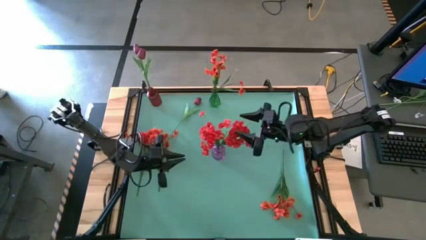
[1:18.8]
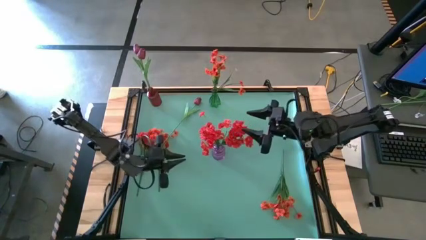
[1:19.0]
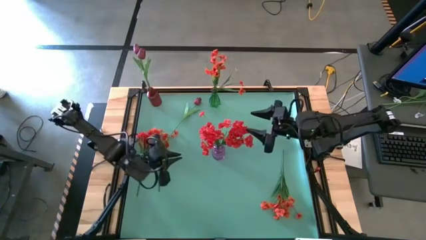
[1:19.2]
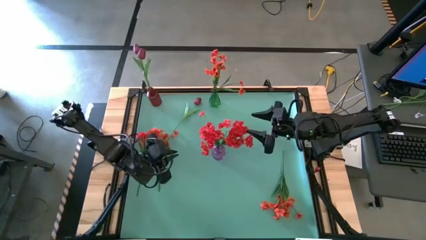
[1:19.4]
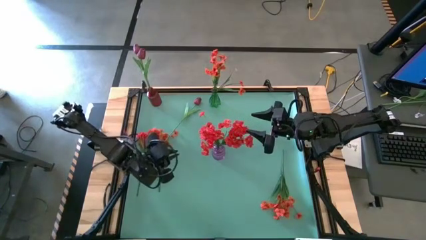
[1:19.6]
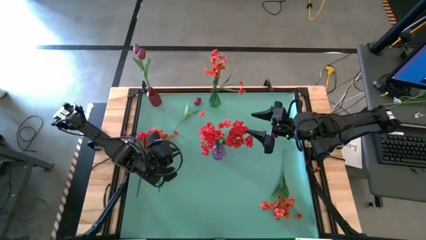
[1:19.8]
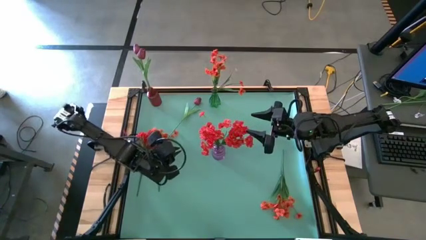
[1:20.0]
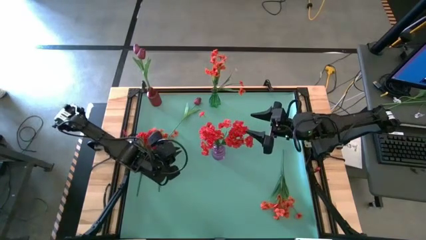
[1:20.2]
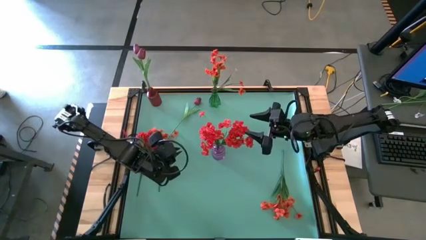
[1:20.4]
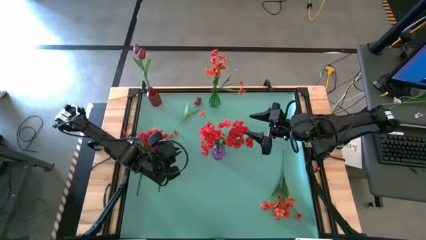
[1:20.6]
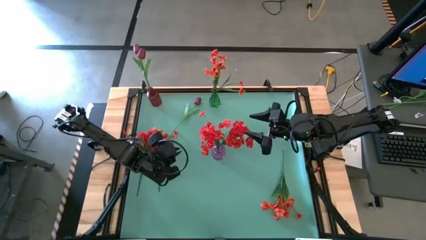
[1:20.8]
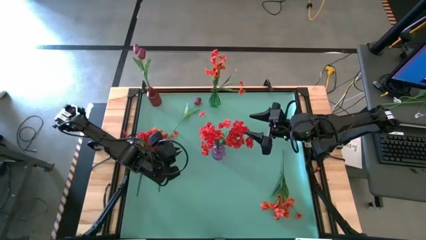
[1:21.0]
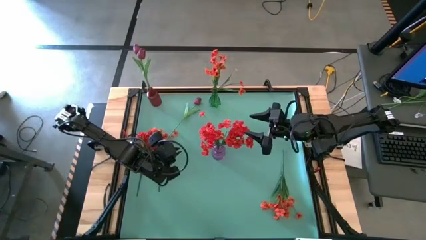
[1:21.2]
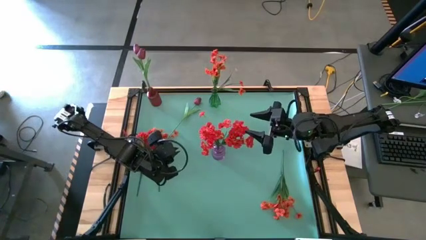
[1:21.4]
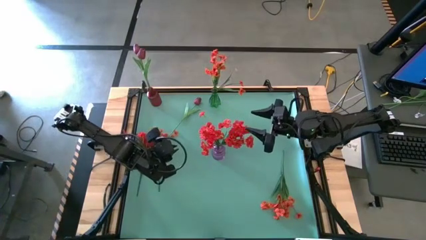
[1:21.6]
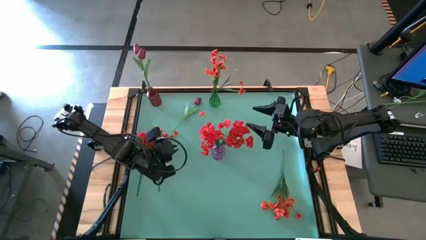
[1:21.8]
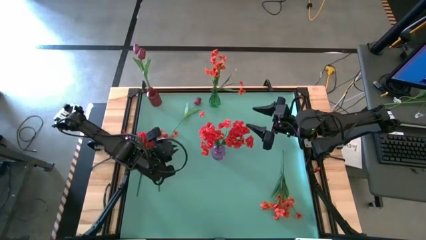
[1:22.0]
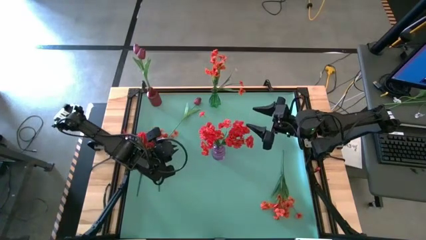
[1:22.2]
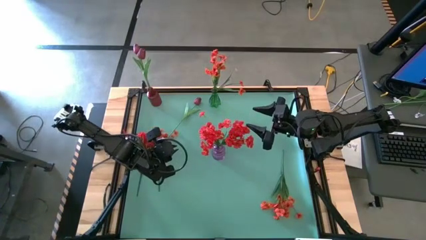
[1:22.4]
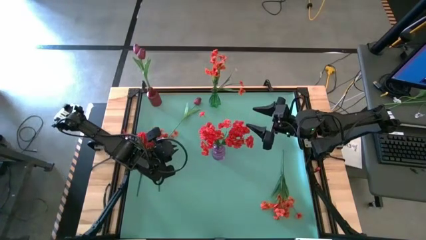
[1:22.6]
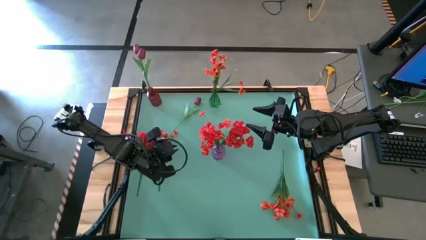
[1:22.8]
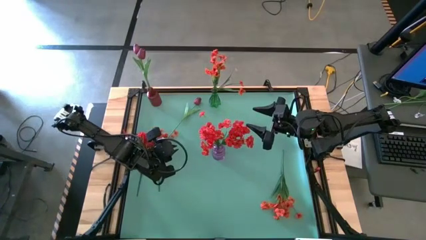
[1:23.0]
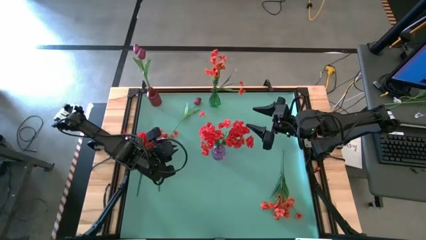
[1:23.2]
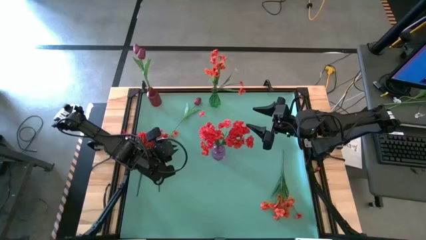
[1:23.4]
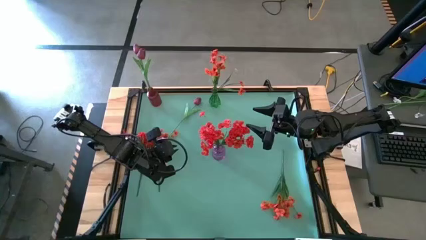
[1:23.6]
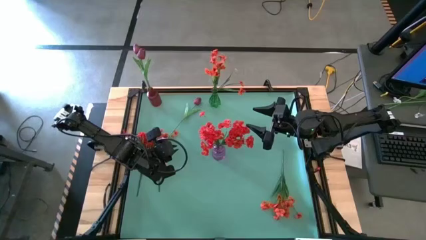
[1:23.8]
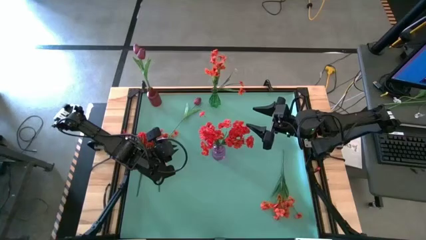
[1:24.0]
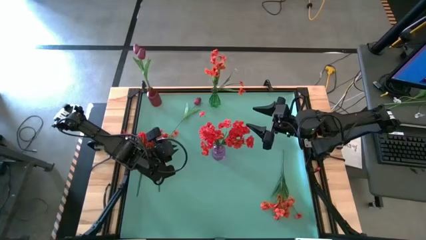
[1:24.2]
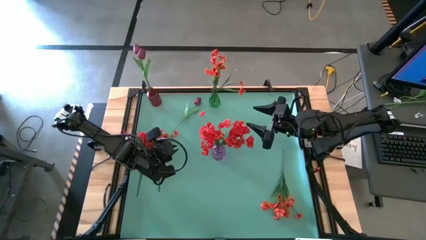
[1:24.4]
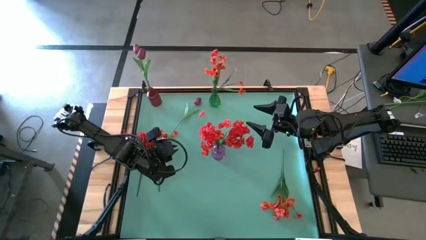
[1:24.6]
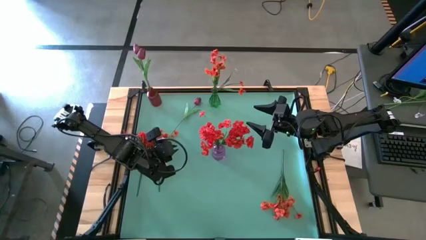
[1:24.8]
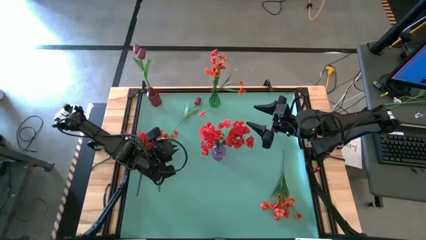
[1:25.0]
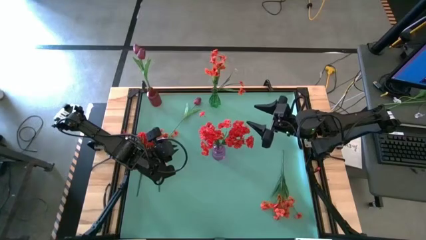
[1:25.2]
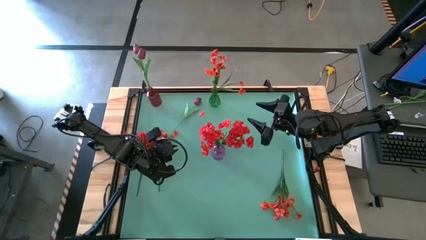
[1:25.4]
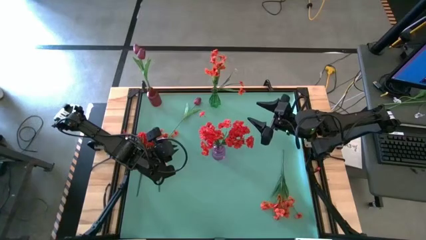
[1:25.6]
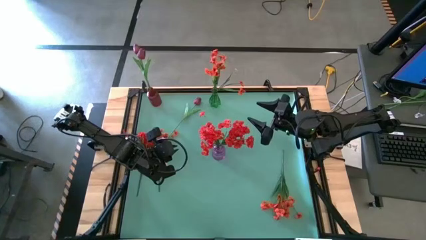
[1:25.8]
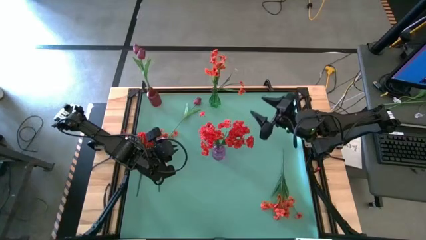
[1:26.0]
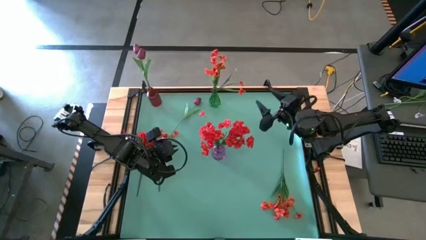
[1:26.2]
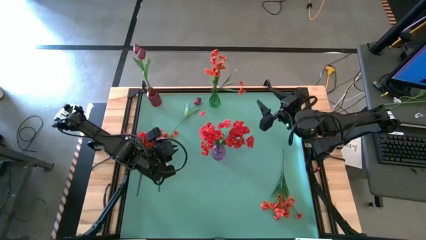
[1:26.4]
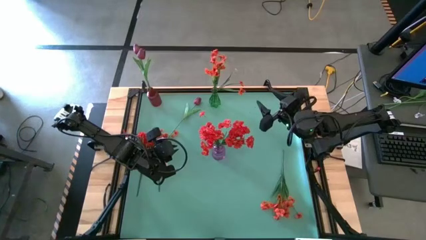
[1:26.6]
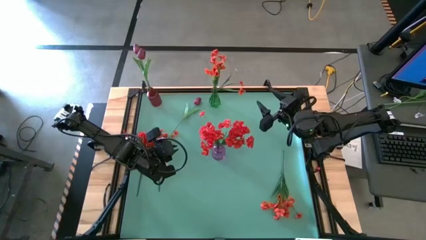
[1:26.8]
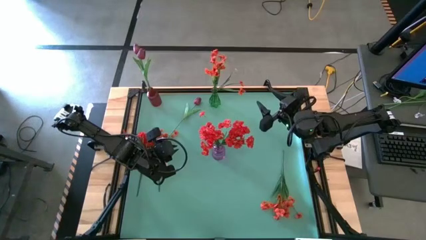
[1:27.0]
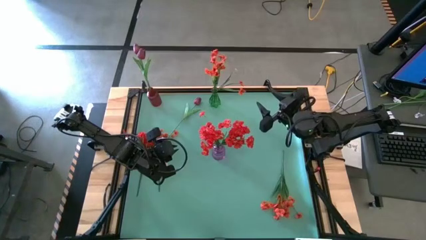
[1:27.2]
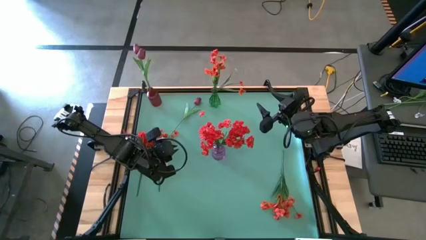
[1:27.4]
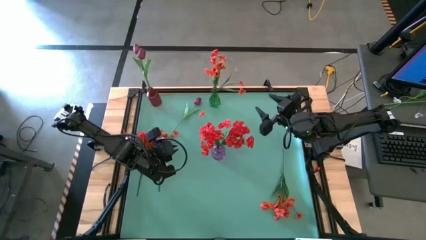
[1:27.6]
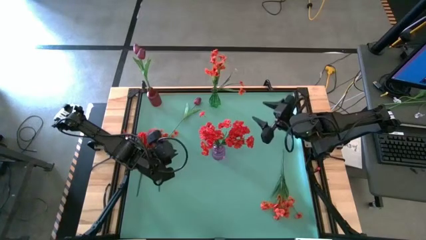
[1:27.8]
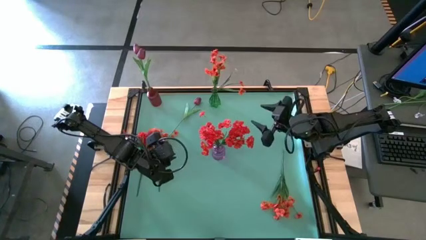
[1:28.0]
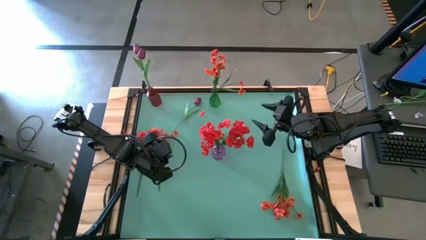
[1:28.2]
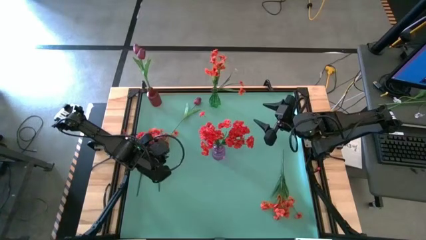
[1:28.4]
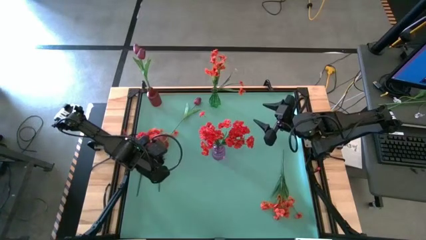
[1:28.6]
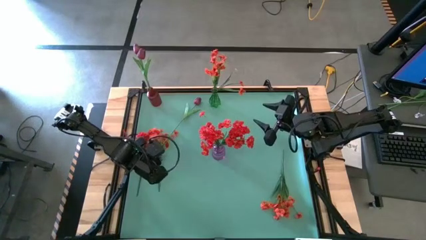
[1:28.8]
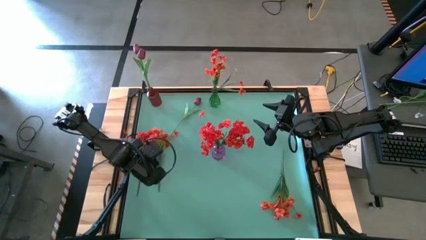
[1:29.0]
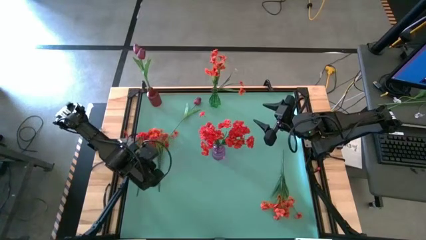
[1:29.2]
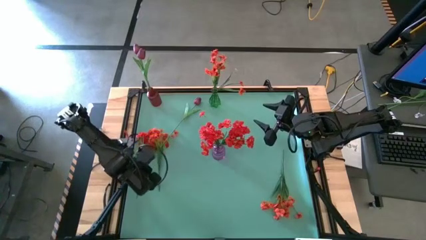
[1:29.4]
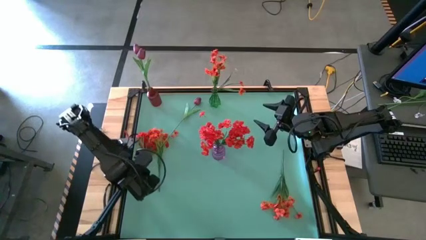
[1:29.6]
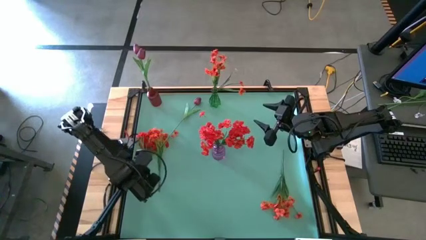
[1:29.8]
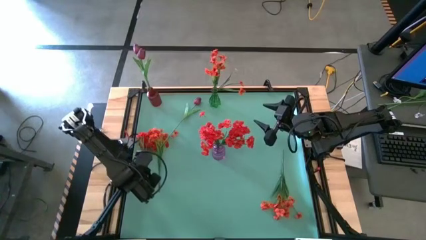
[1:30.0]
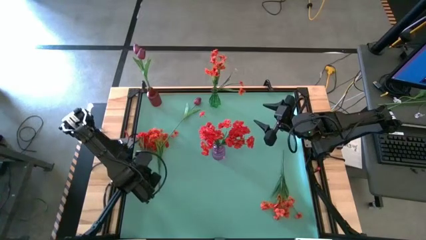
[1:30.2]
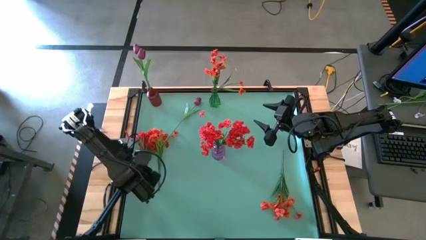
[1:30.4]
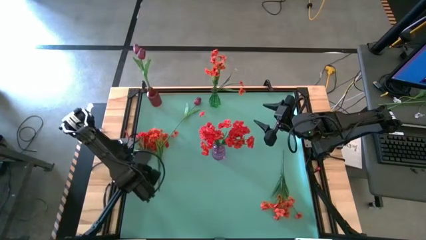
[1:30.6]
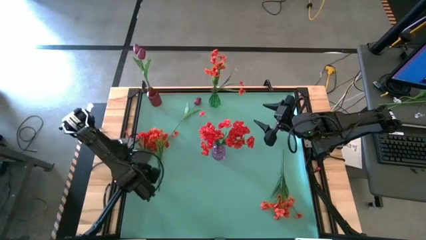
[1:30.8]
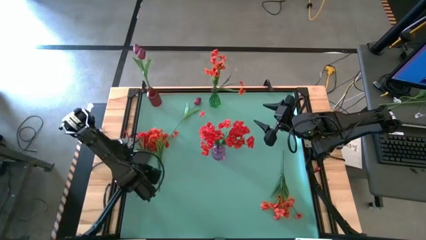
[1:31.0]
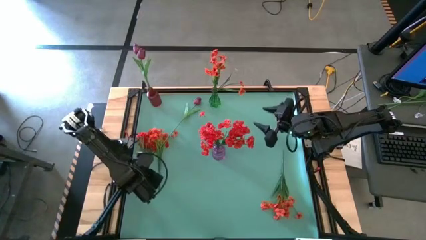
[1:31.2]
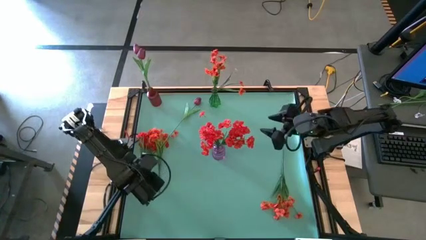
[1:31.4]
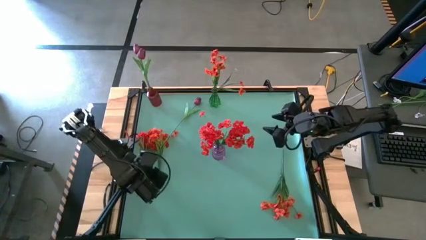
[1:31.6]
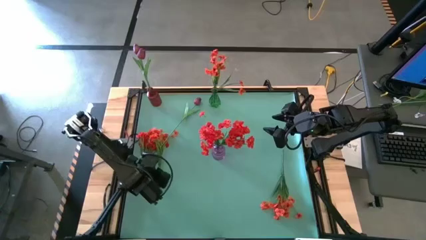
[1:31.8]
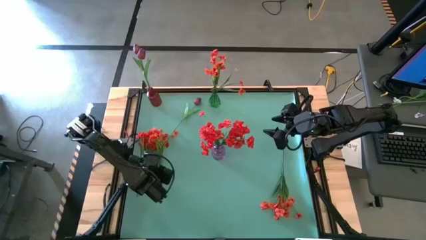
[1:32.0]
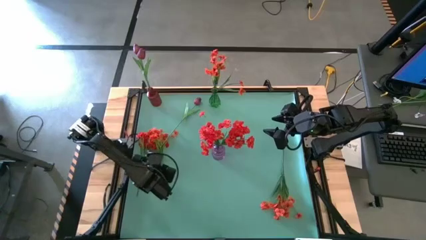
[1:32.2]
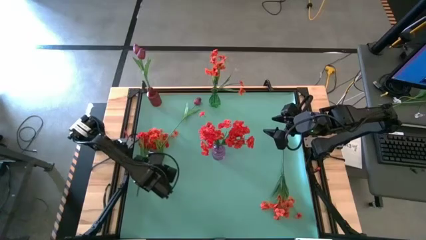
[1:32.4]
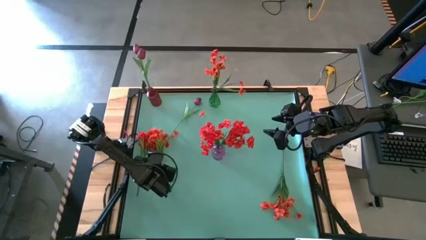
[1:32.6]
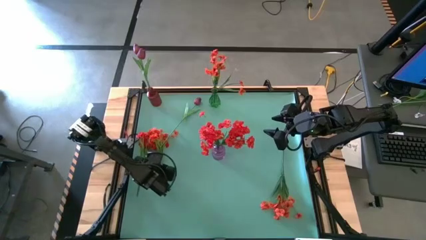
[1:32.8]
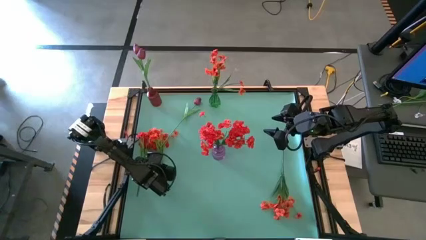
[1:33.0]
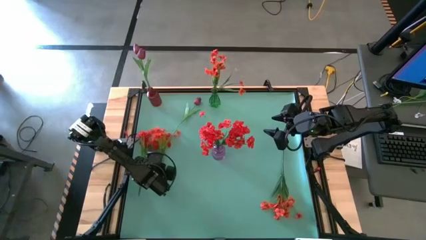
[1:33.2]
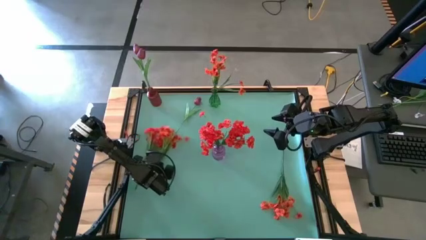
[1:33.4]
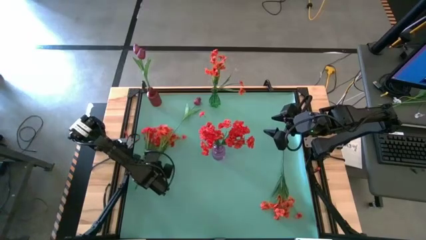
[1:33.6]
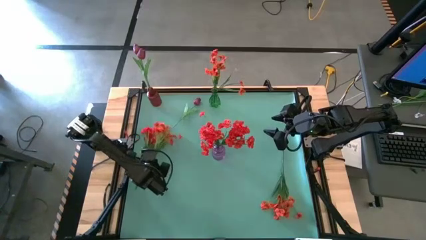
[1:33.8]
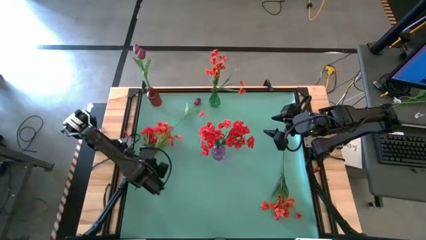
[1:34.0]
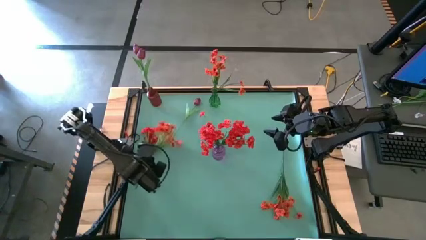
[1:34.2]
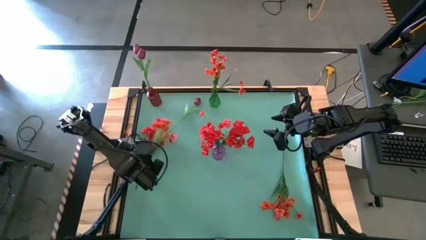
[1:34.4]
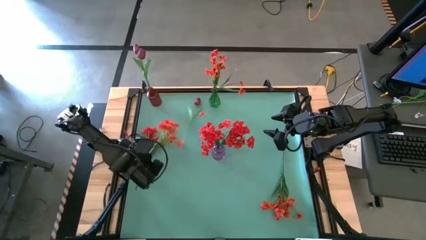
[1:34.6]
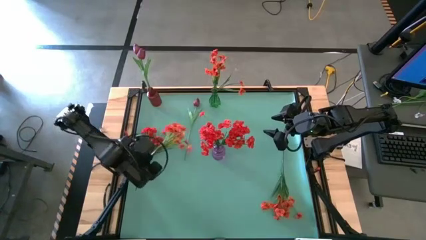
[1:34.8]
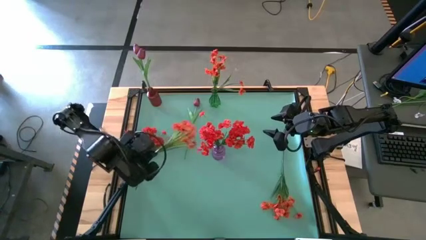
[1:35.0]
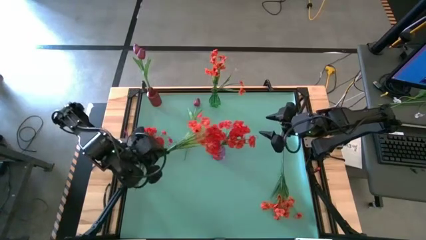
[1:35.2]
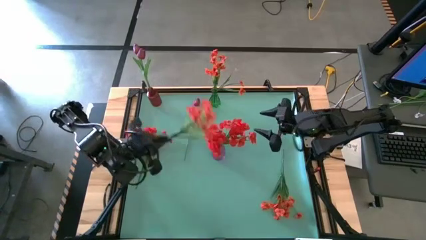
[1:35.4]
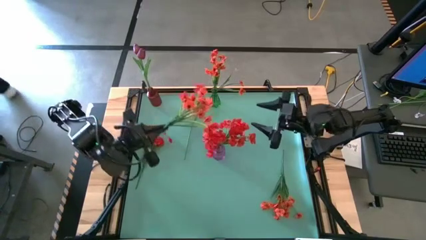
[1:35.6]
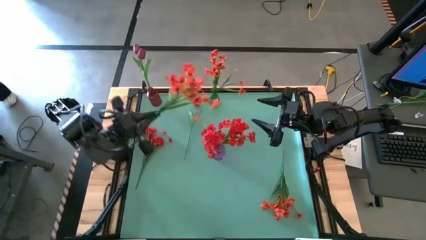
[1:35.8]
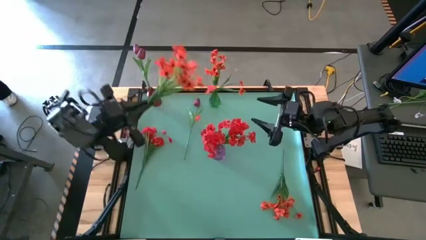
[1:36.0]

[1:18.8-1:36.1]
Task: Sort flowers into vase by color
Put the orange flowers into the green vase
